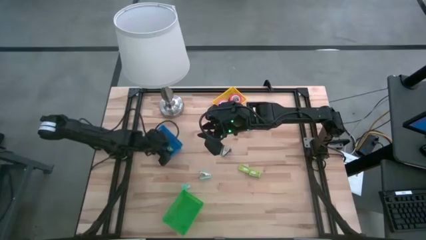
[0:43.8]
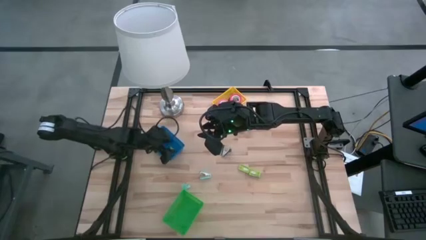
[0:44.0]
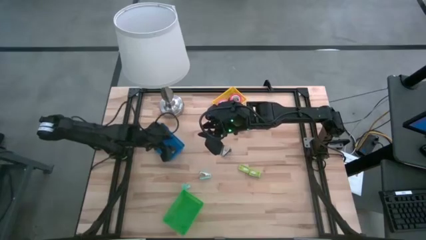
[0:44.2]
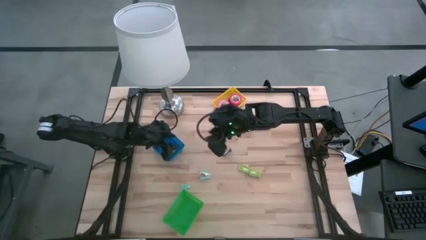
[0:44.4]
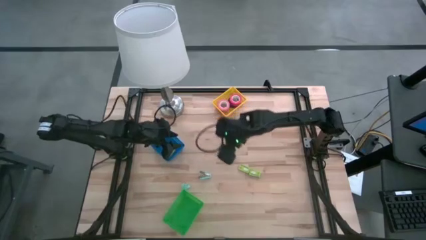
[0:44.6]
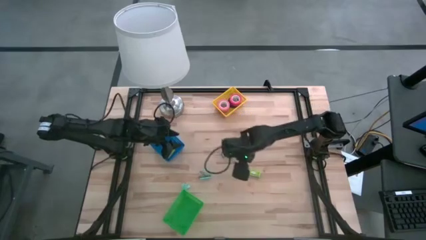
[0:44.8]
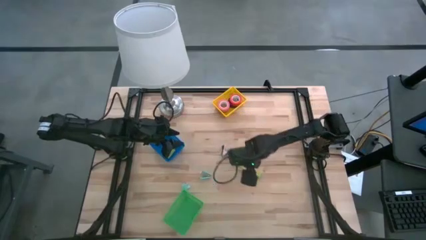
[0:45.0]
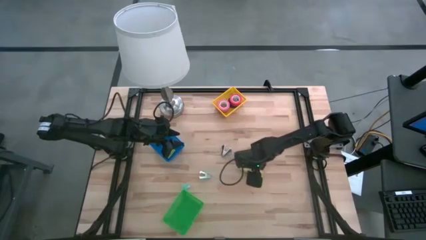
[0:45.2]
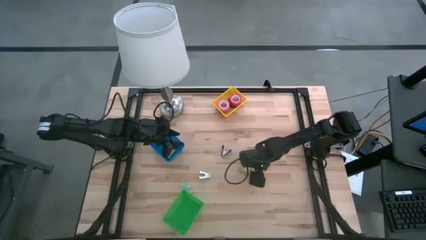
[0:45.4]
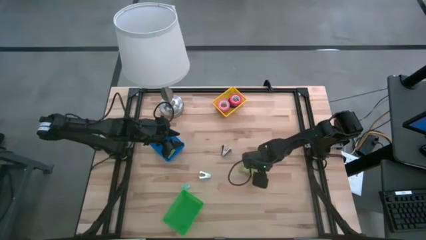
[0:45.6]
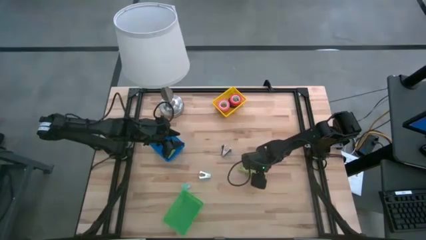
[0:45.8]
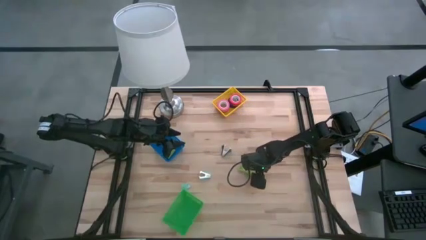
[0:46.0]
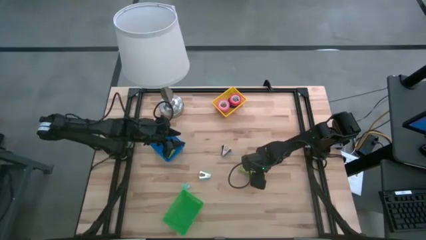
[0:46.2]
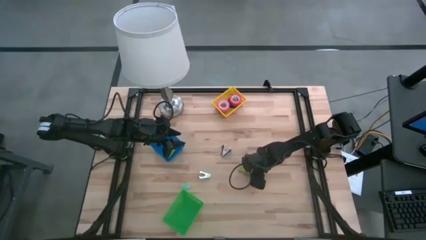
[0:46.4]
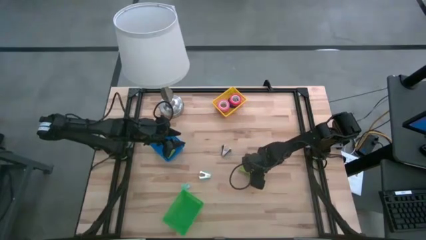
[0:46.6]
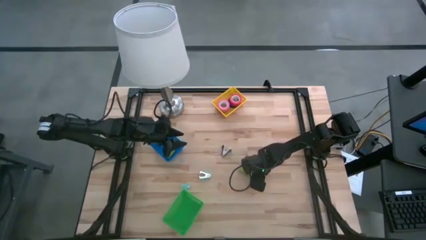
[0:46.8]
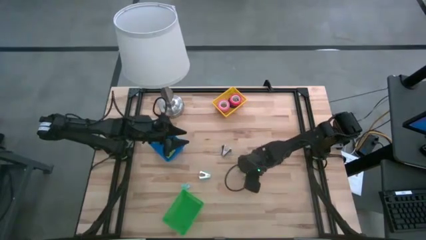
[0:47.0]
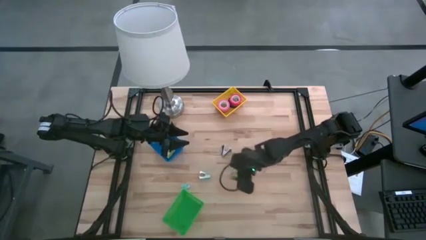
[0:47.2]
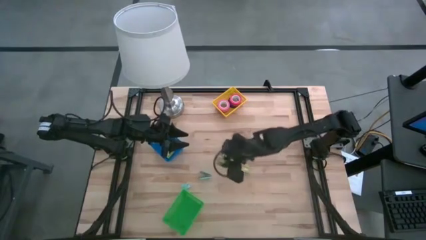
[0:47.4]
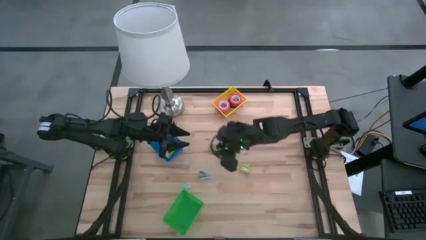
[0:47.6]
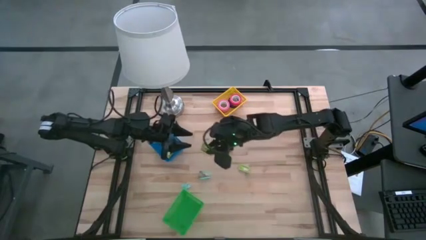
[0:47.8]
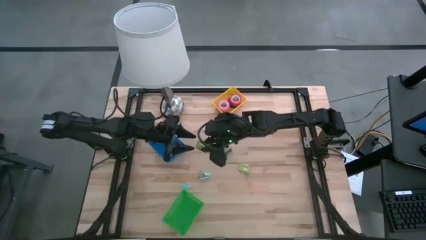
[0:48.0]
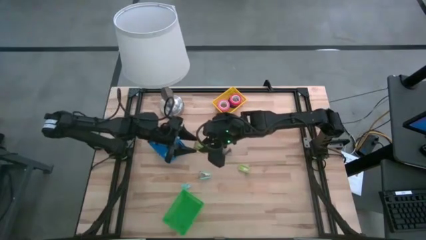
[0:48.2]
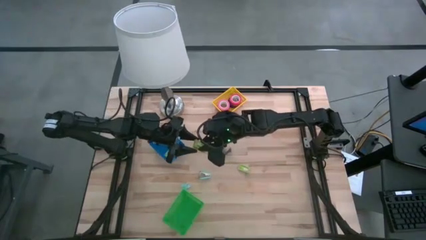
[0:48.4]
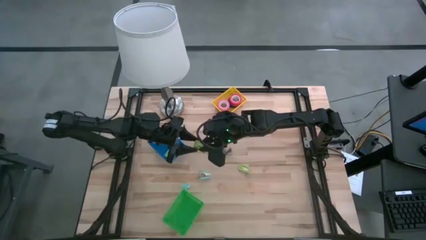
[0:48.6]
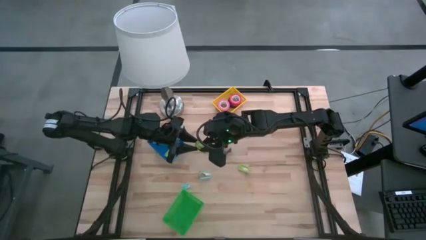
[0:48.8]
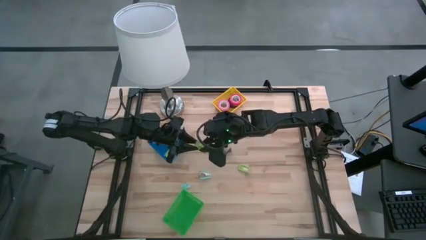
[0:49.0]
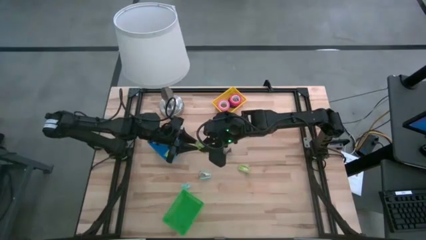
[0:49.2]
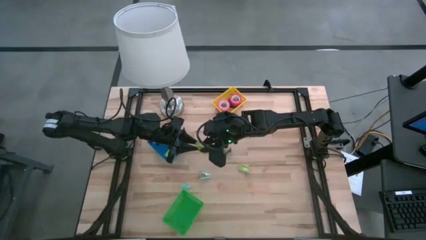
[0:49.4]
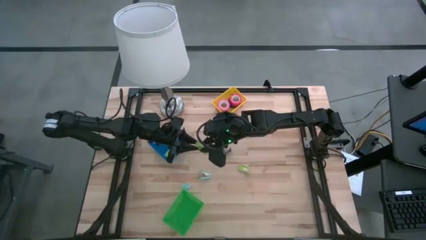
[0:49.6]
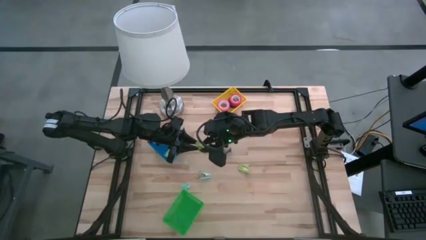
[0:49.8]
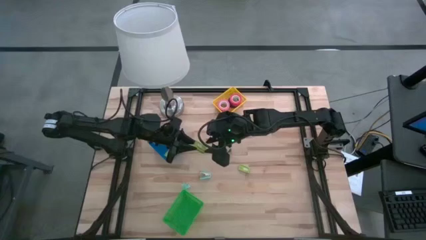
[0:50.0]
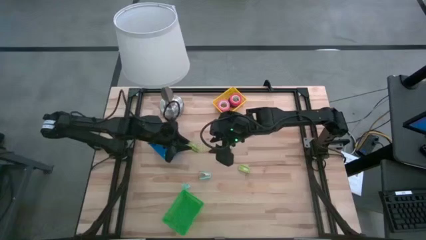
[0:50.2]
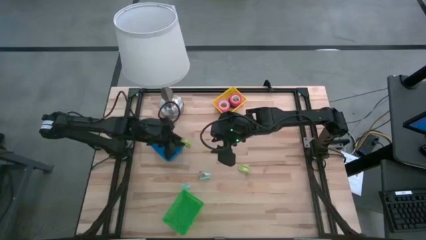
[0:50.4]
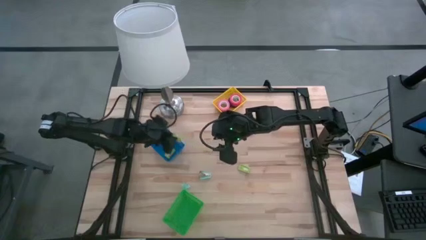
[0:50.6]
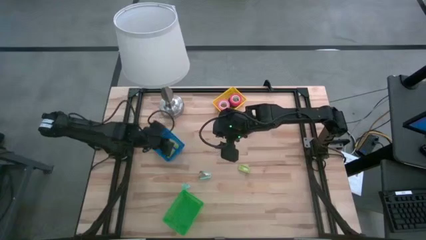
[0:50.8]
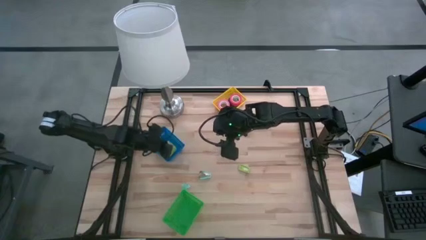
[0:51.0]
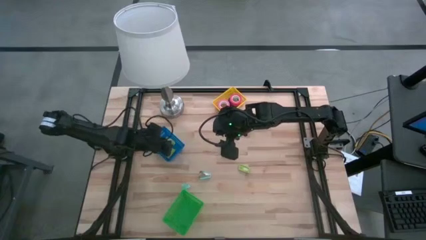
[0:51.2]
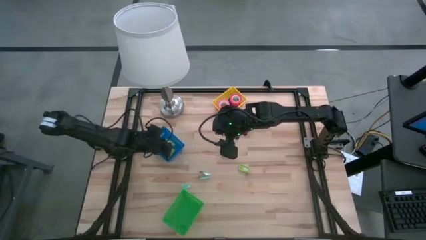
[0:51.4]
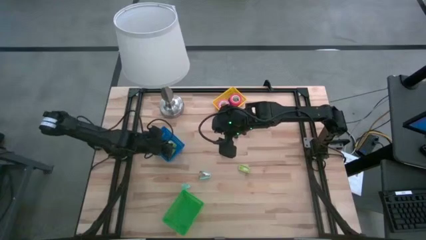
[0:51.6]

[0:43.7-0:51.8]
Task: Pick and place Stapler, Stapler remover, tape
Put the right green staple box into the blue bin

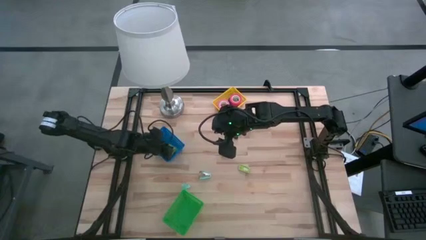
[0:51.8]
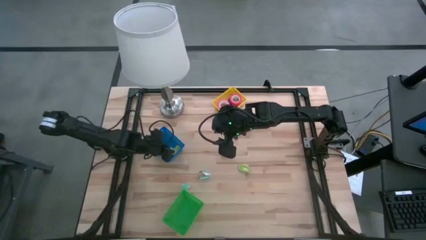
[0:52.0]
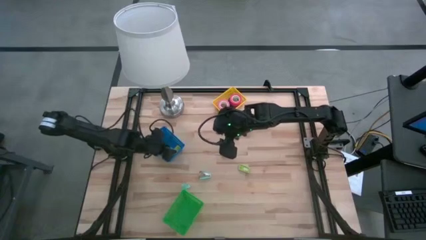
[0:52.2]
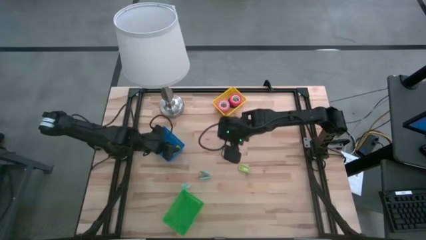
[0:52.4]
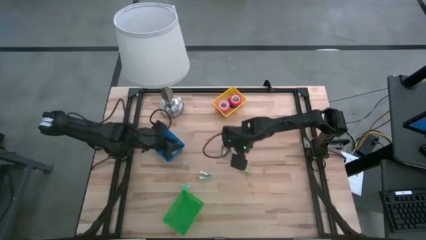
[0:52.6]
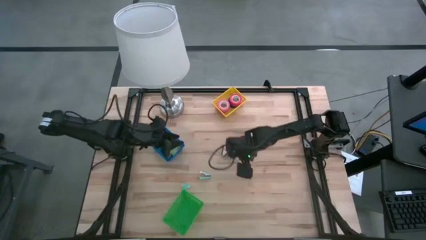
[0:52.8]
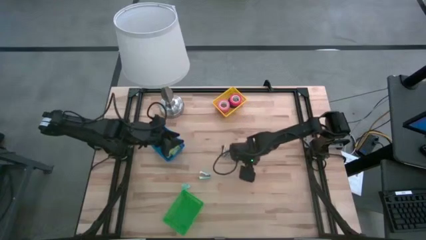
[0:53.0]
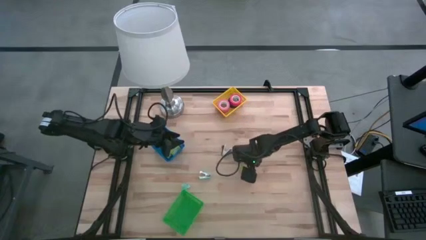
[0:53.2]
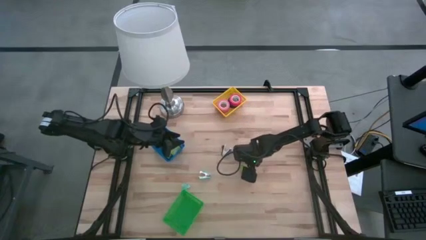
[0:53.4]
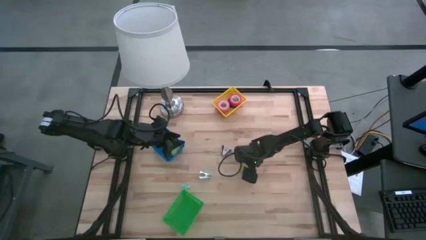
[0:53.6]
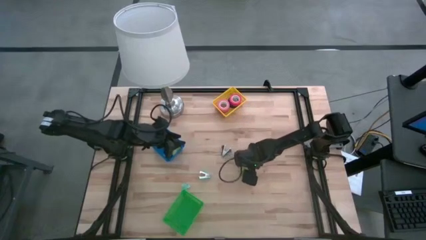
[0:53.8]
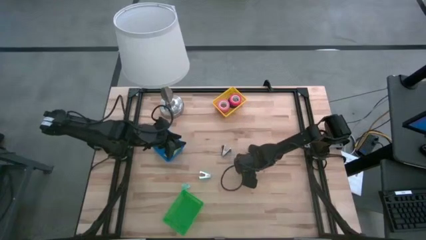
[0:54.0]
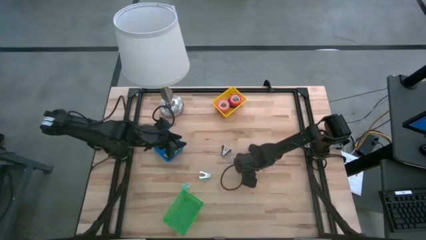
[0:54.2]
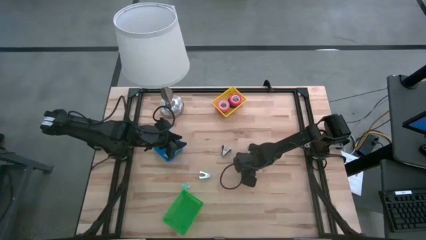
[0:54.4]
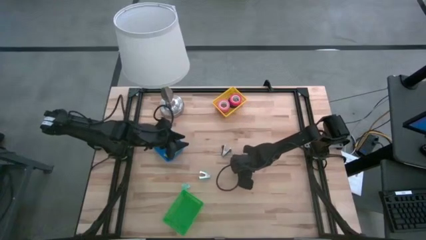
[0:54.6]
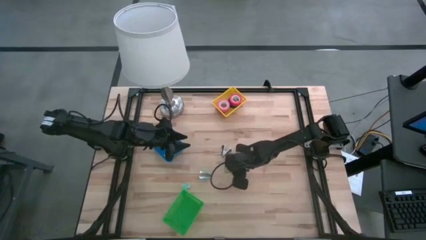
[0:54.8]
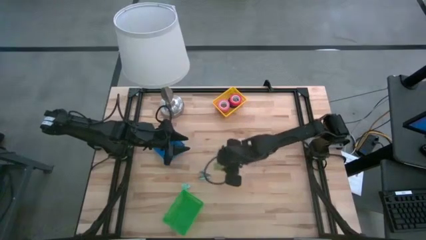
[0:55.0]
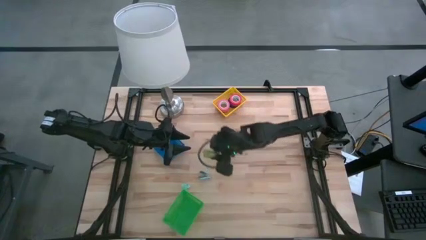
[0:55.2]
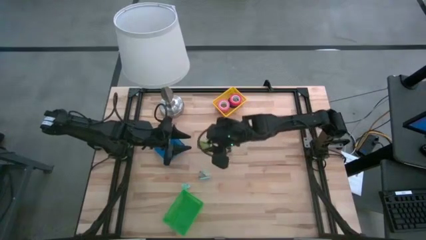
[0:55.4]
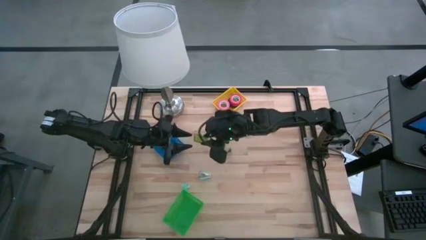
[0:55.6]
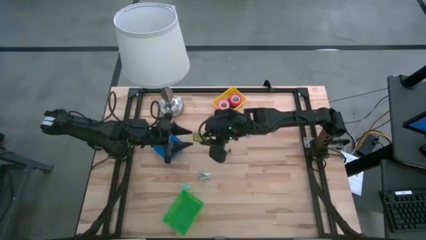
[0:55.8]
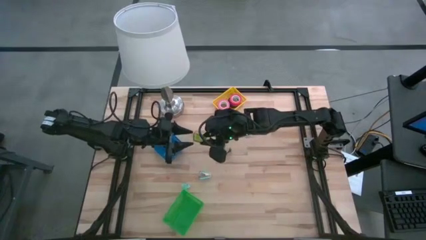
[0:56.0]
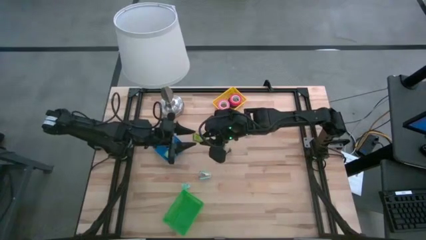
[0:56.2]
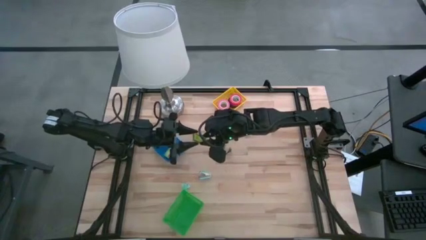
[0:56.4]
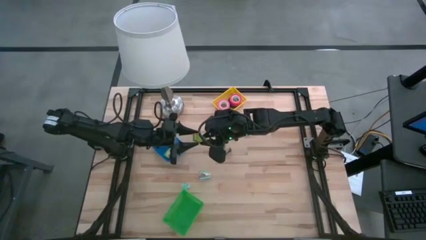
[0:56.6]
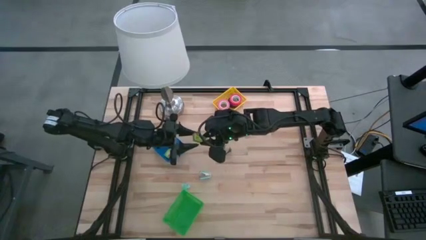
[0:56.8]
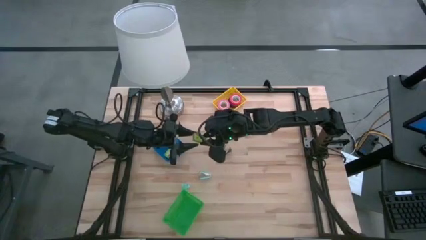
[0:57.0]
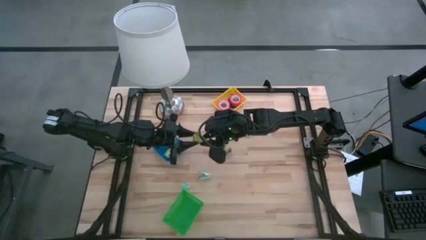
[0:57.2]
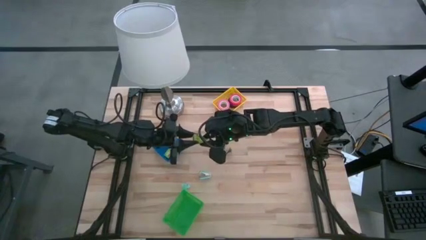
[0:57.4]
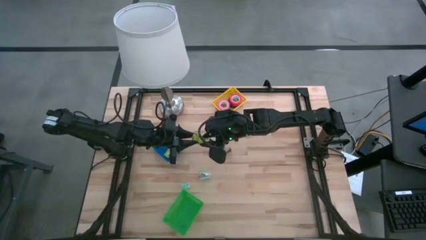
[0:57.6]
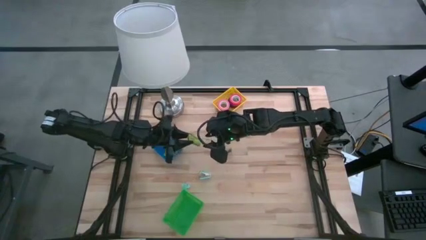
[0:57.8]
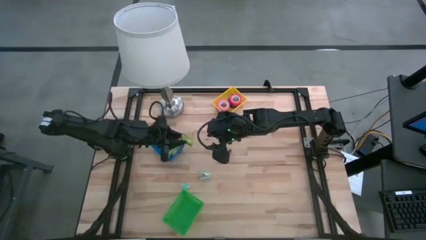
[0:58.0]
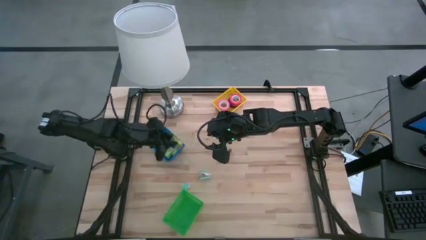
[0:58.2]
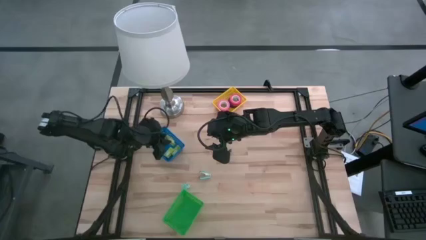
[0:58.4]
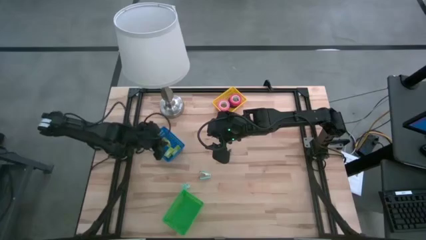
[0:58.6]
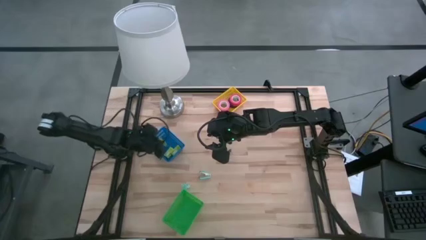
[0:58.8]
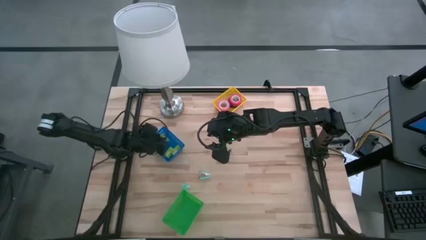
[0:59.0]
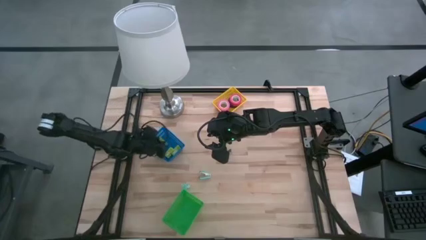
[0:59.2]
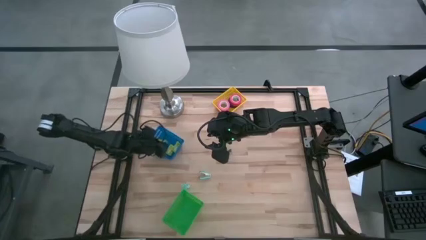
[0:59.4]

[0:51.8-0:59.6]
Put the green staple box into the blue bin

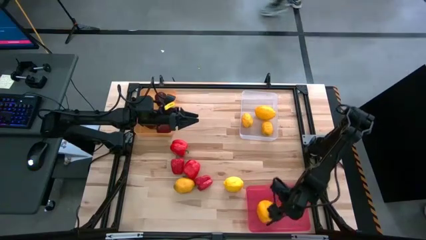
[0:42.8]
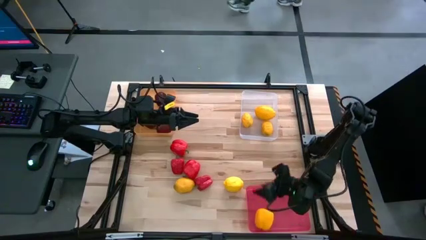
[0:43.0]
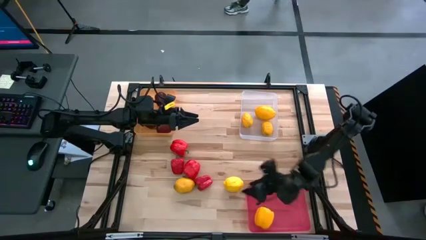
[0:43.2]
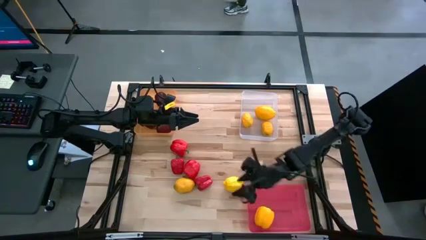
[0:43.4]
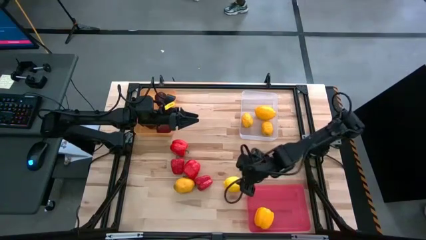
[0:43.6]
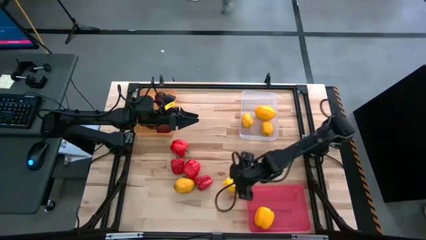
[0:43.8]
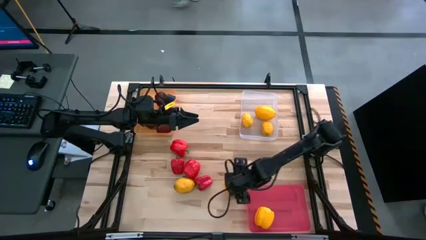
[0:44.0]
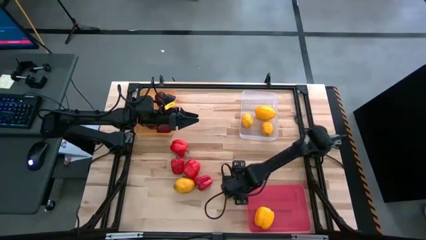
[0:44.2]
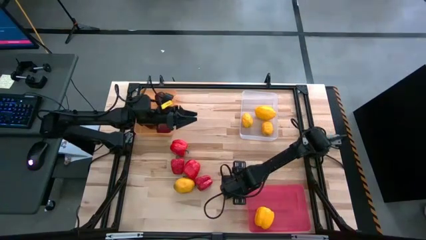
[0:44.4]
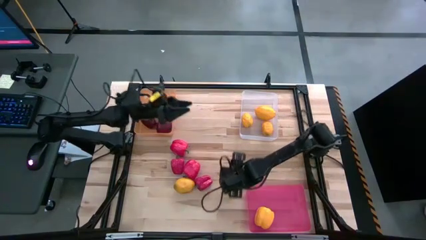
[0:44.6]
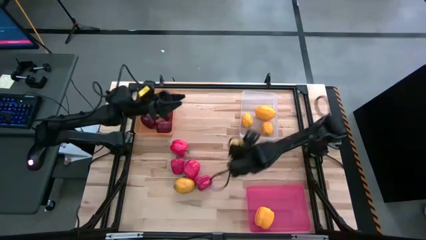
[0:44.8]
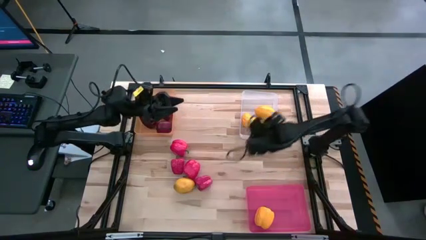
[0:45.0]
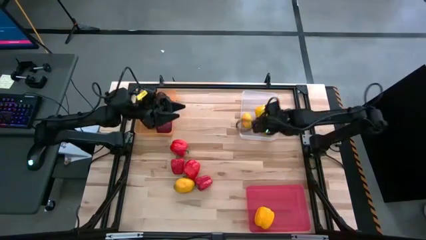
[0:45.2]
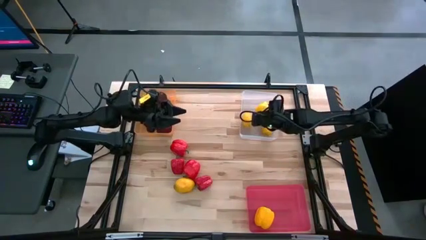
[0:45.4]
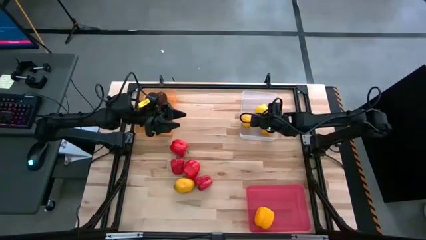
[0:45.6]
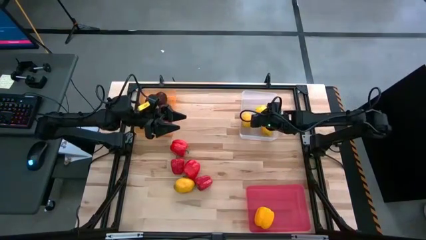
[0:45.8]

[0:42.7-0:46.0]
Task: Sort produce into baskets
Put the lemon into the white bin
